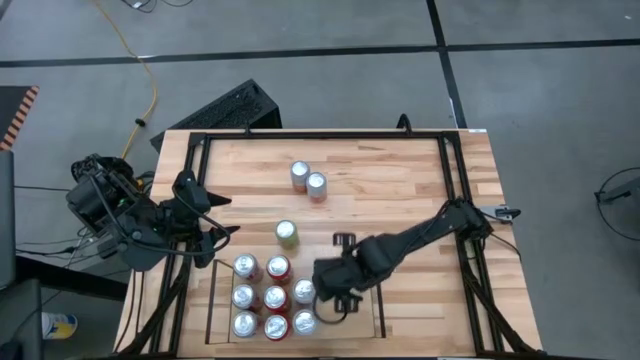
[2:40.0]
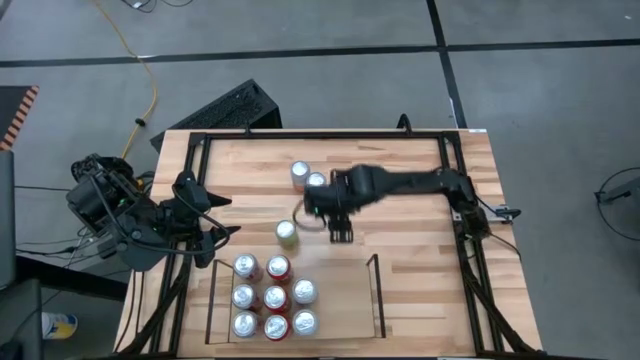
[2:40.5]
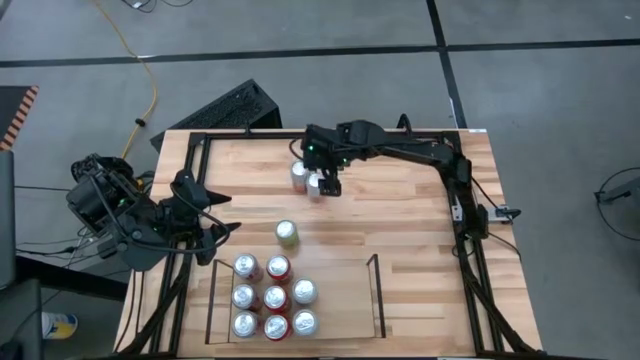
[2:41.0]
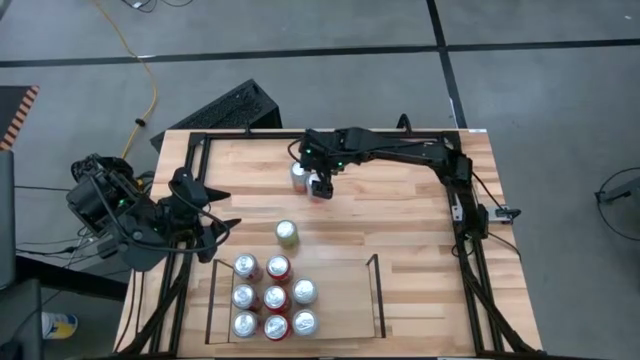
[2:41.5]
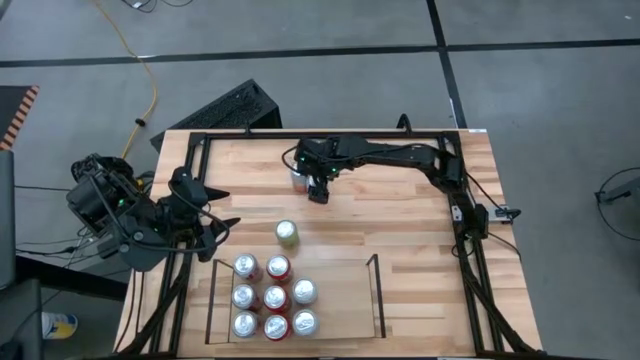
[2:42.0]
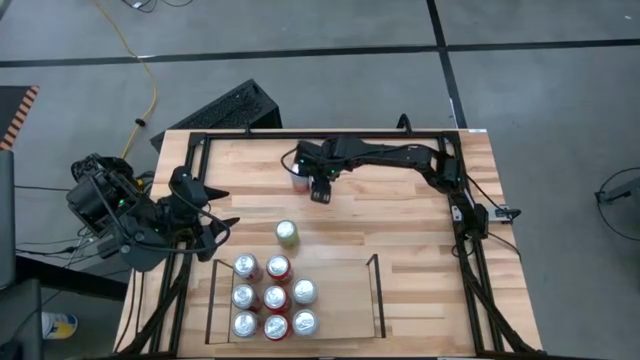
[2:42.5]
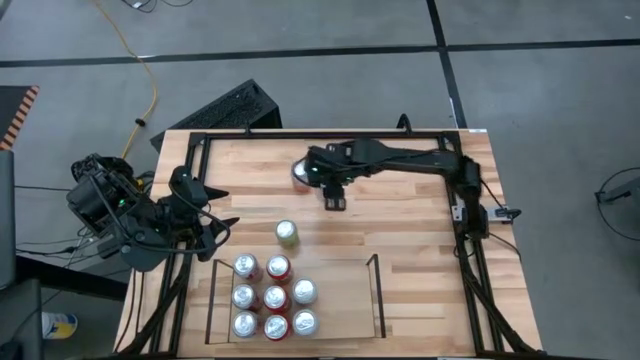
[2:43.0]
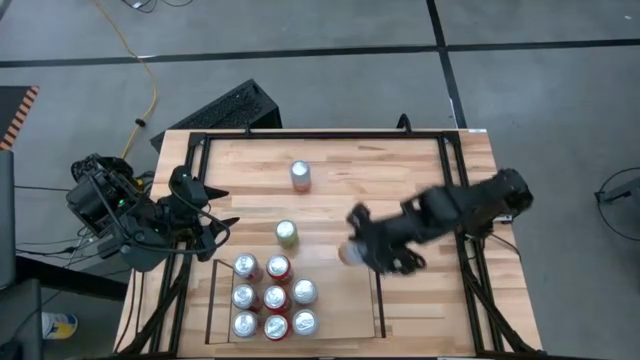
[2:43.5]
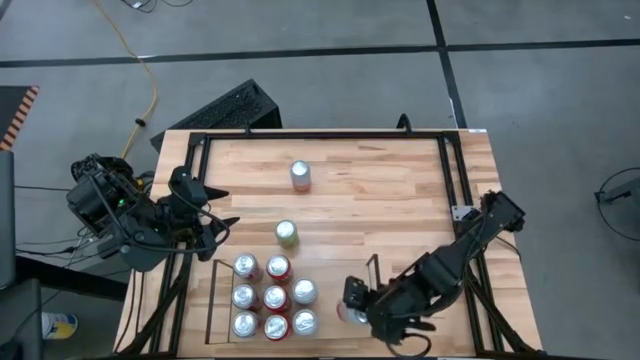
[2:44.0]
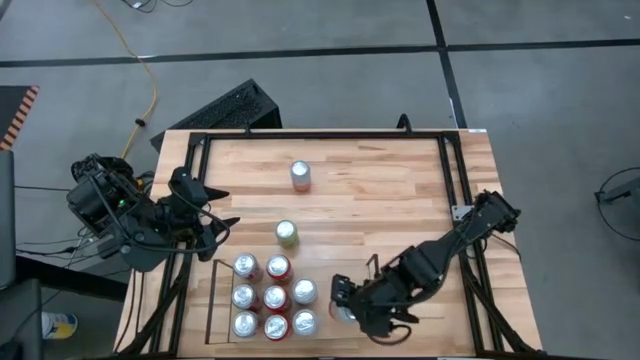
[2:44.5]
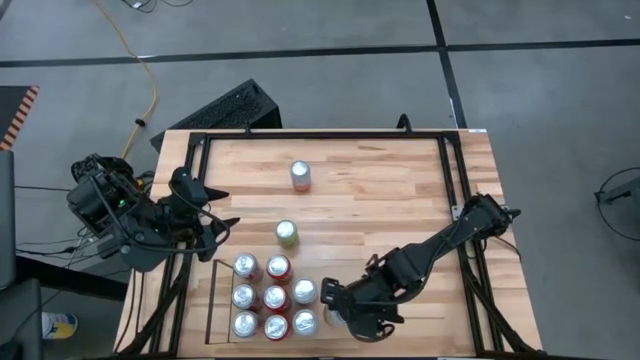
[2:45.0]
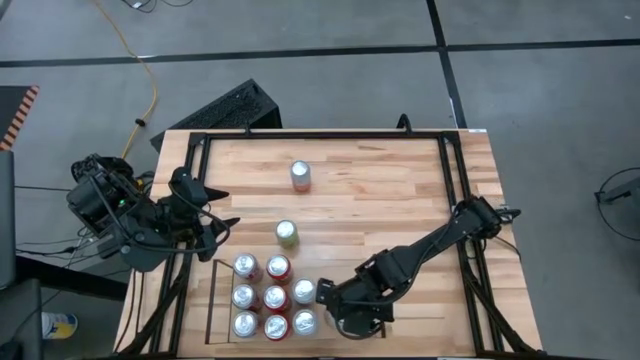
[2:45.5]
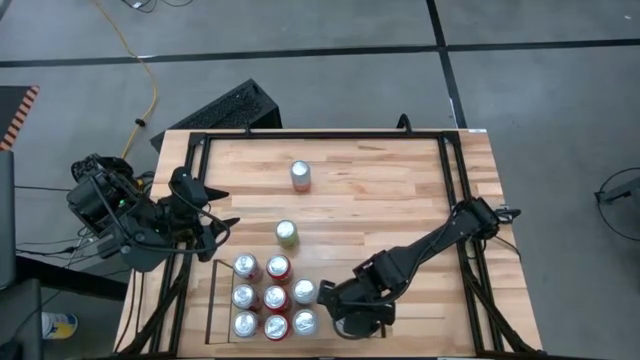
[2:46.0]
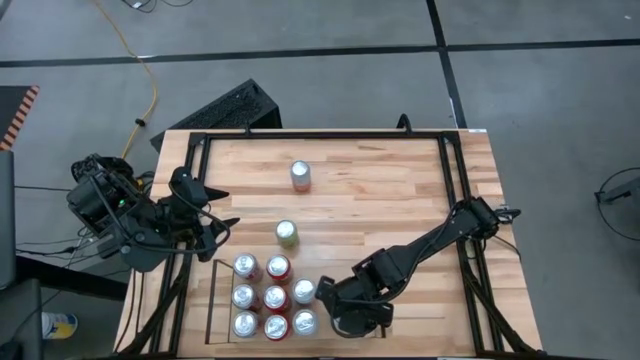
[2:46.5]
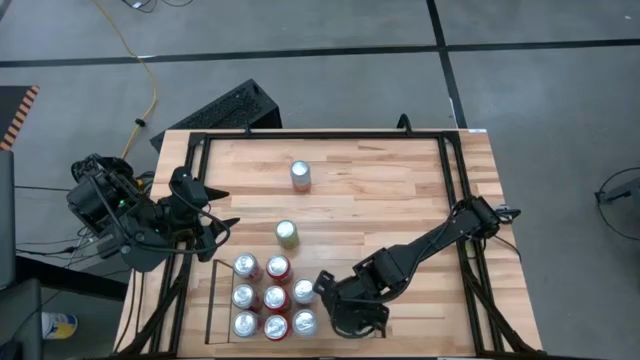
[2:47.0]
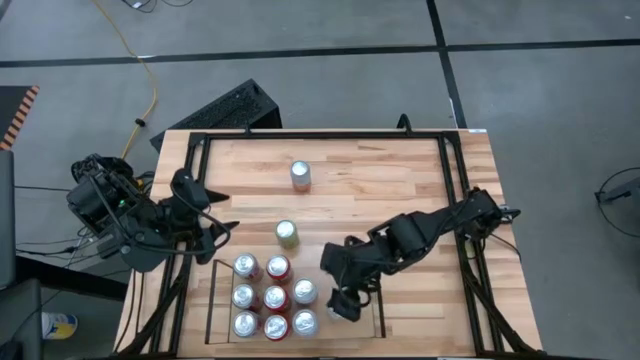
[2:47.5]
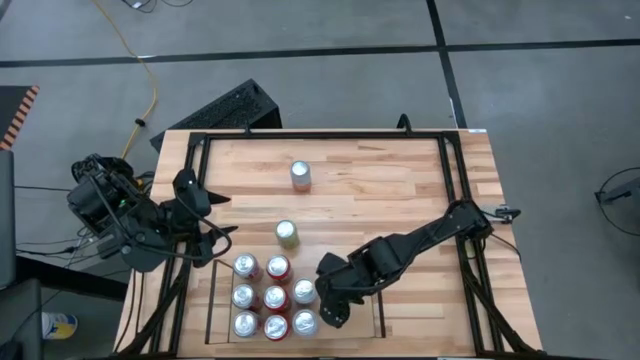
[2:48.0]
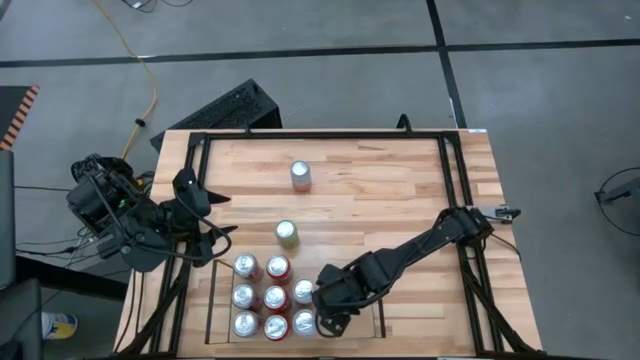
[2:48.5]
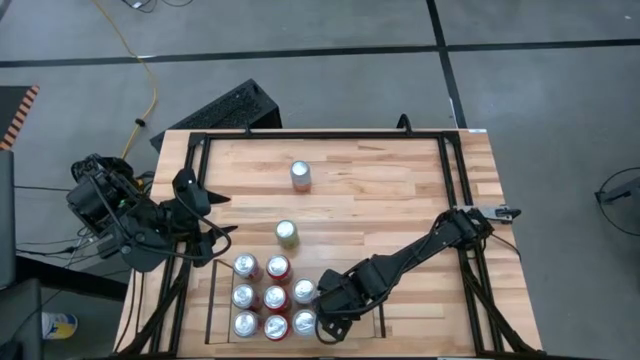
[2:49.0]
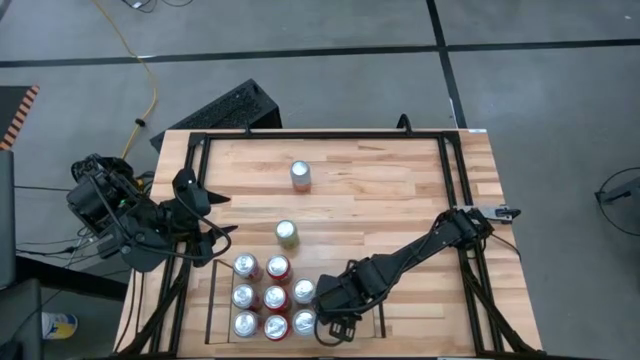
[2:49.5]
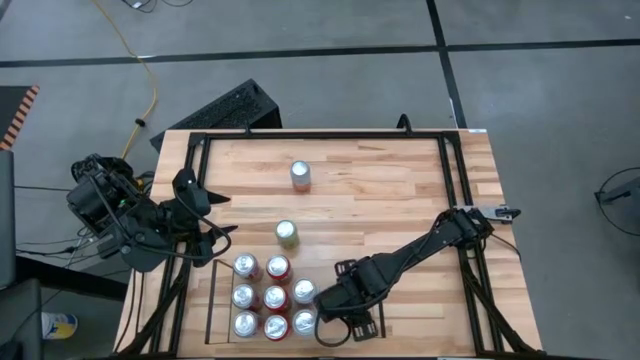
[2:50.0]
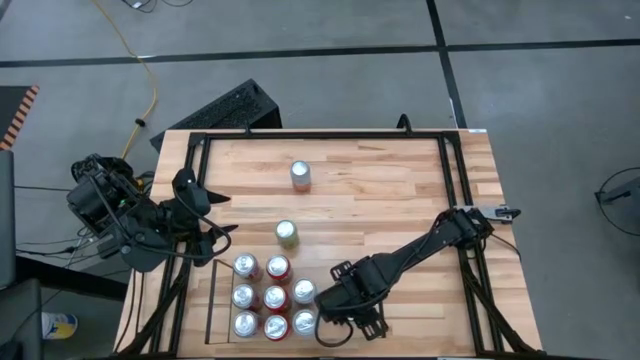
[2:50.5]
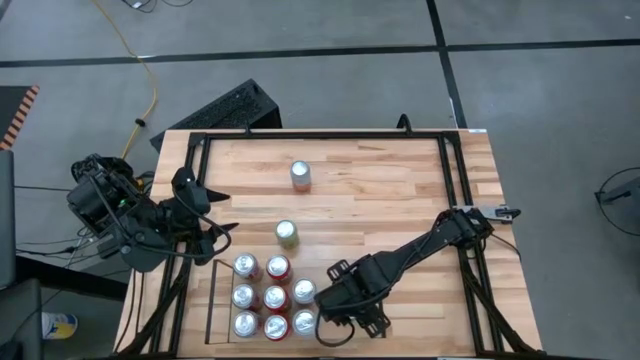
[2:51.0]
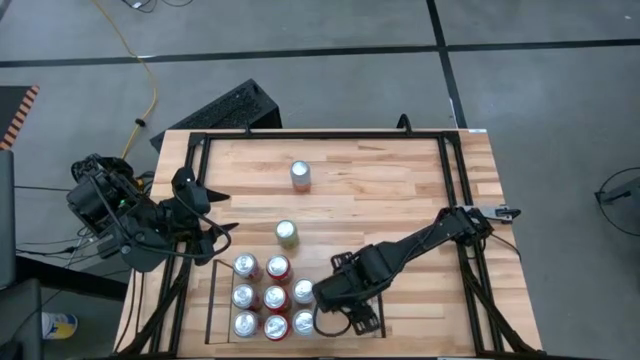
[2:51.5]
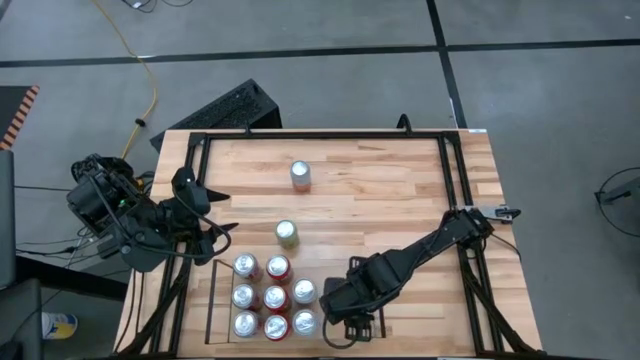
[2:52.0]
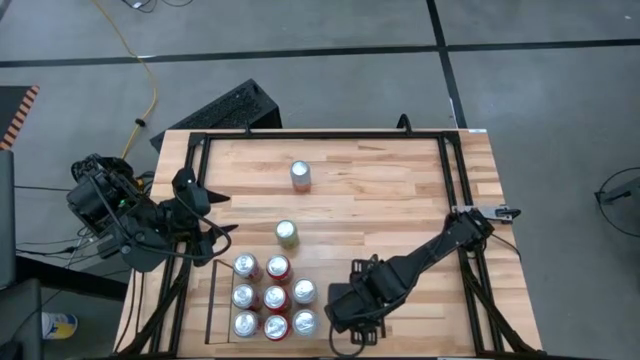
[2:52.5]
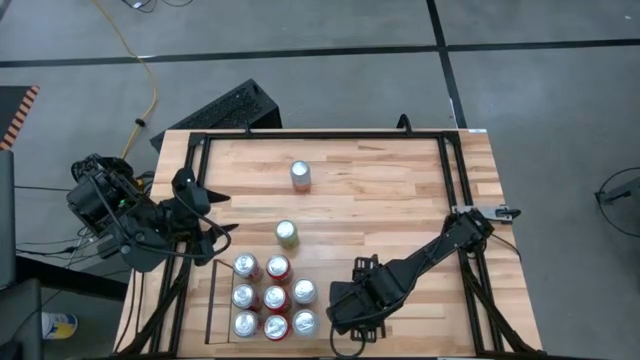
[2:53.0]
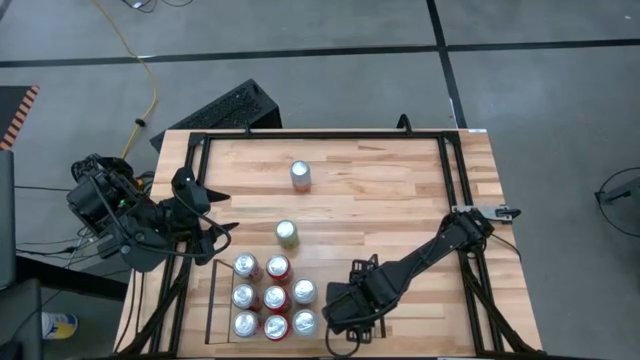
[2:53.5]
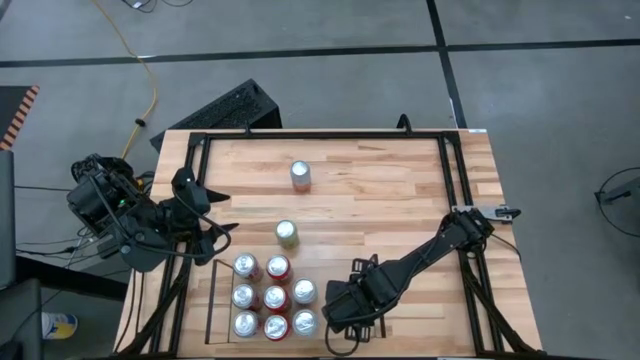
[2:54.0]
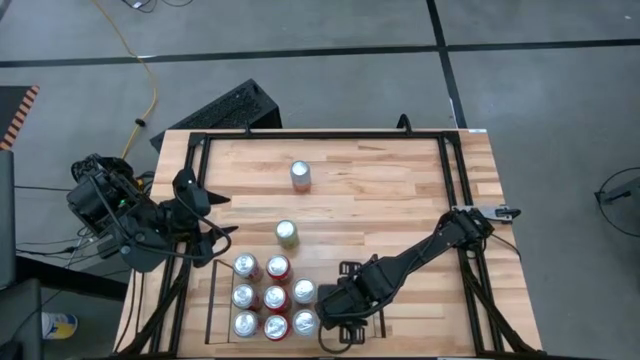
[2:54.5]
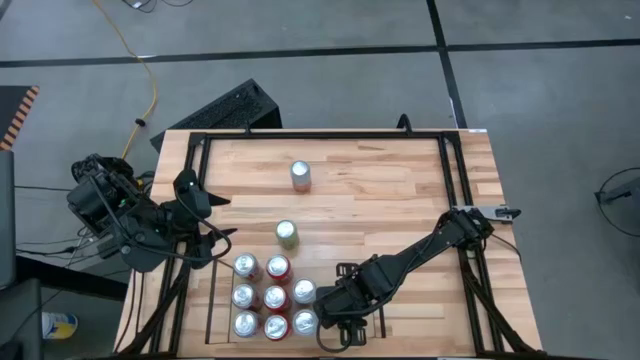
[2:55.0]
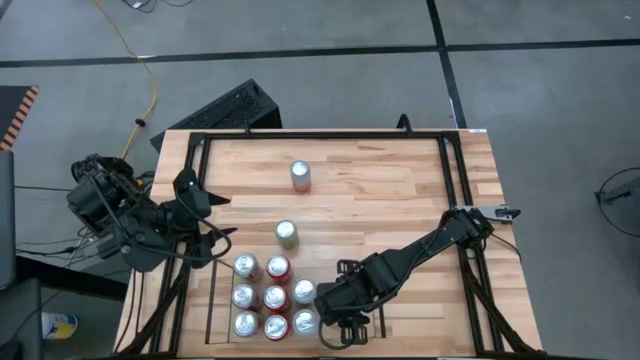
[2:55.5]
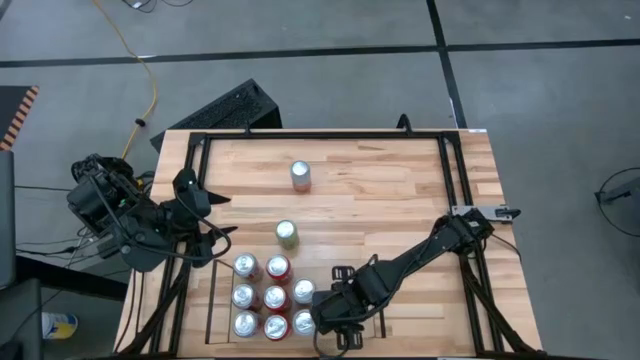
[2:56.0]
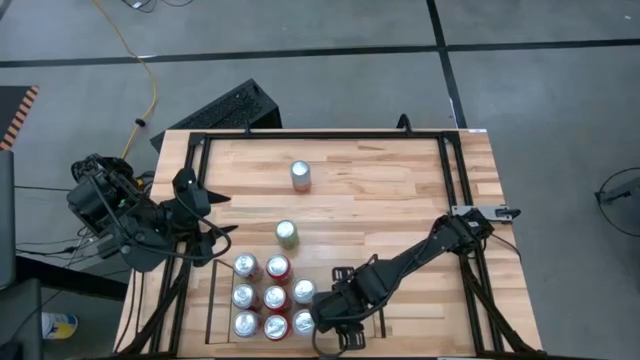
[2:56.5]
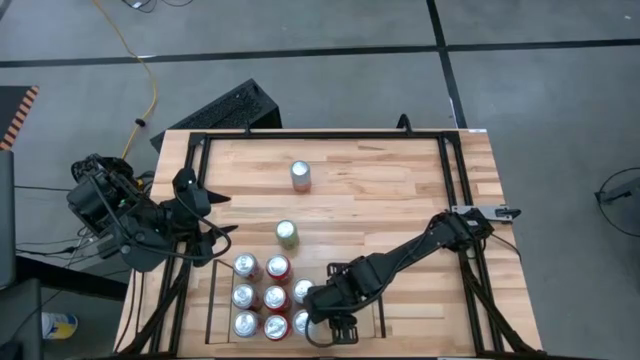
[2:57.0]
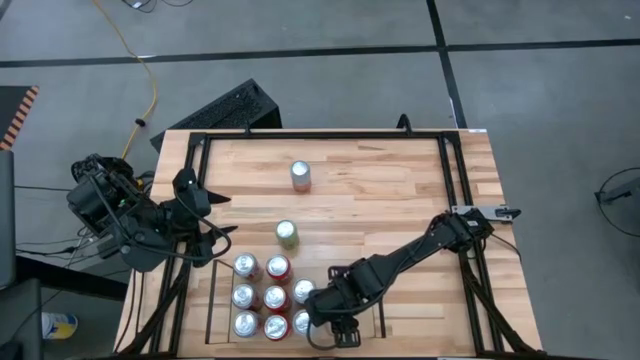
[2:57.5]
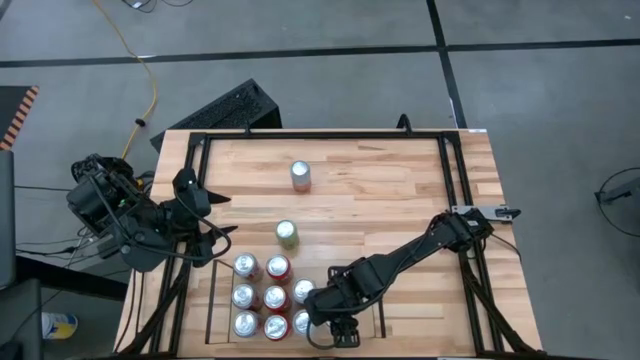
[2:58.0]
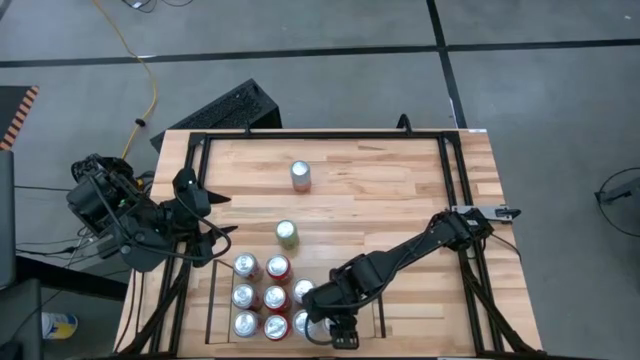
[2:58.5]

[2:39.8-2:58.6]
Task: Place canned beverage on shelf
Put the pink soda can on the shelf

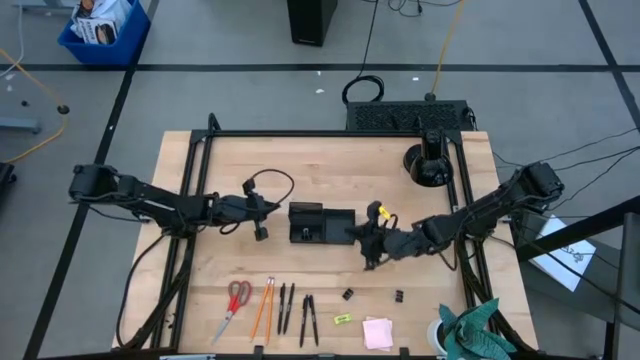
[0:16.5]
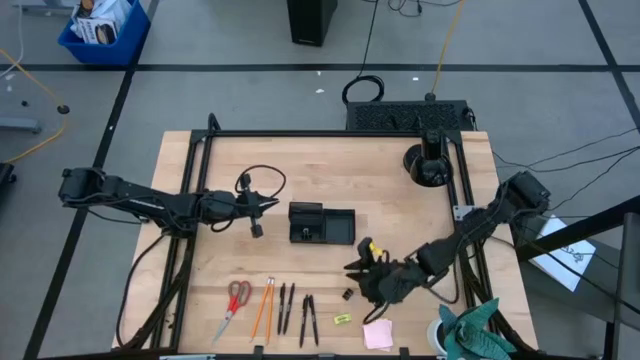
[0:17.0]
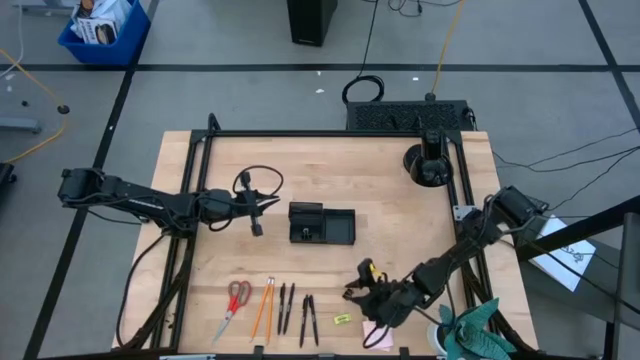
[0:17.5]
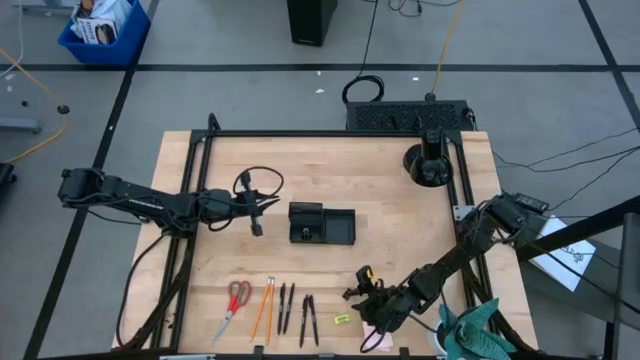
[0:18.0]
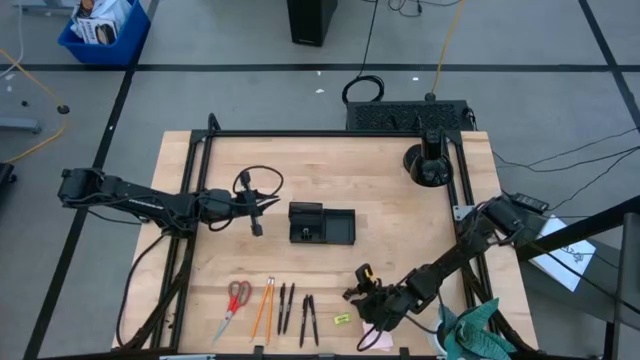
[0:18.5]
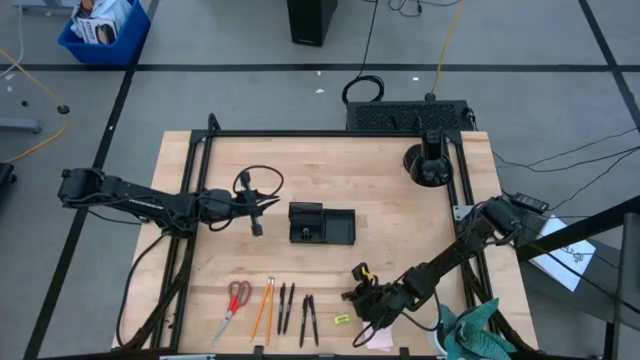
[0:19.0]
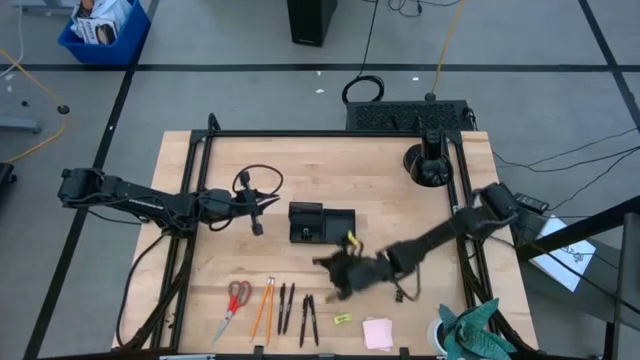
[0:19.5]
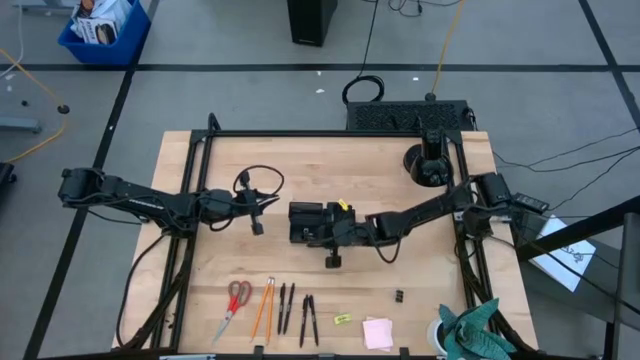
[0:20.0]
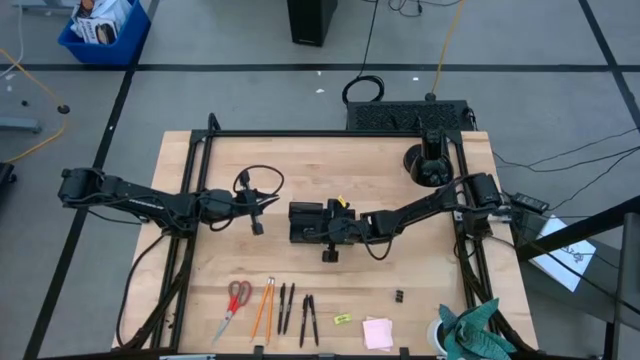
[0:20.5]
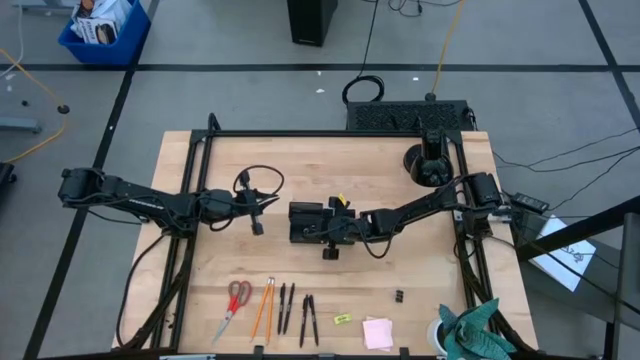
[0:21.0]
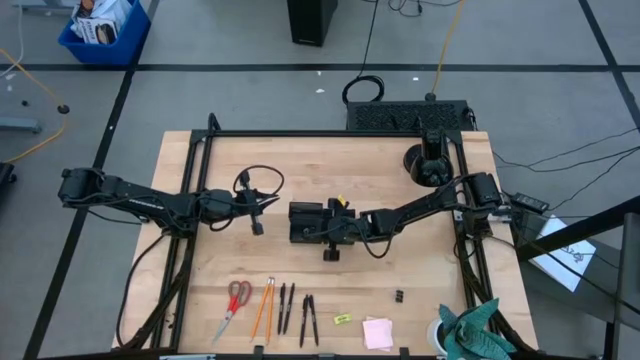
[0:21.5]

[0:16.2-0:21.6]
Task: Pick and place office supplies into organizer
Put the black binder clip into the black desk organizer
